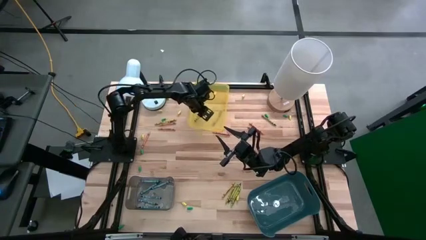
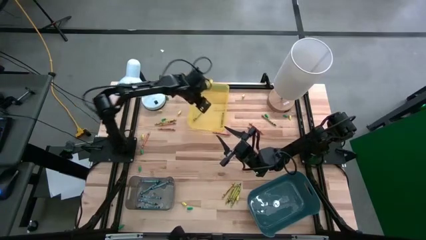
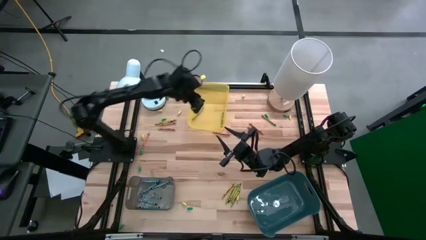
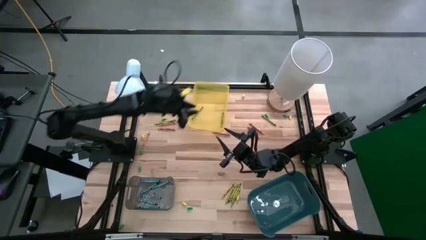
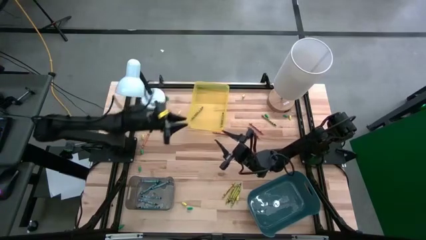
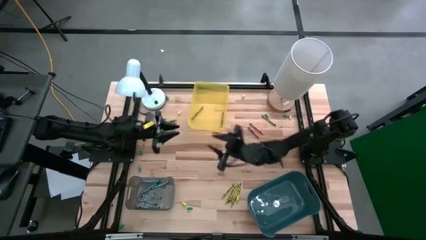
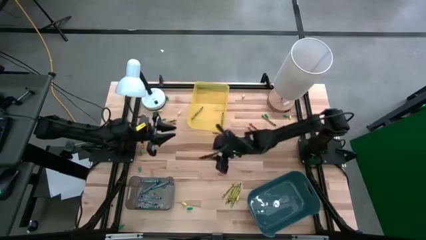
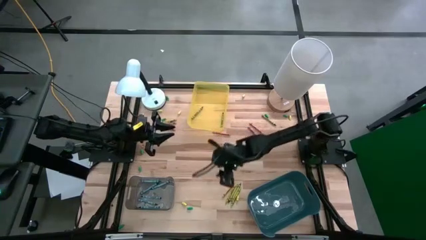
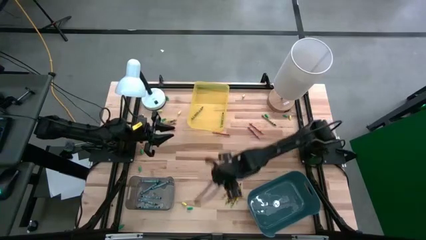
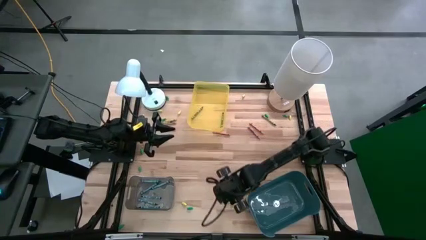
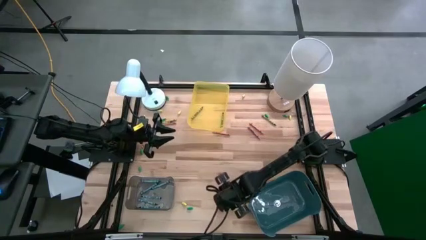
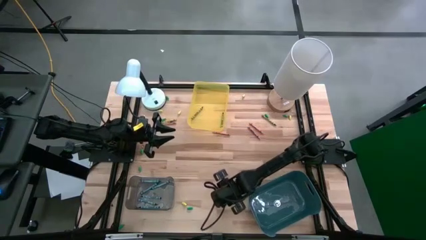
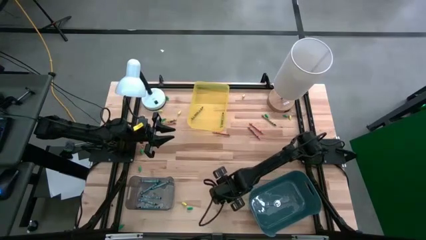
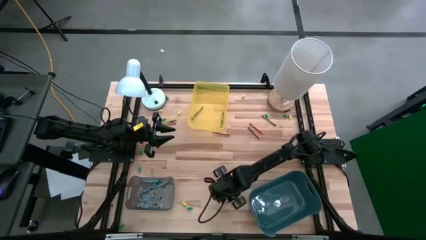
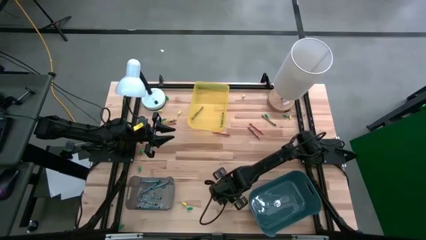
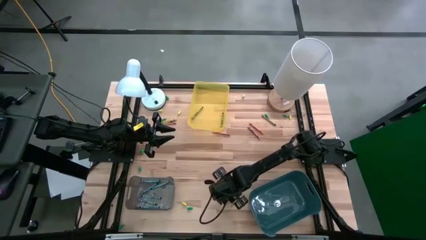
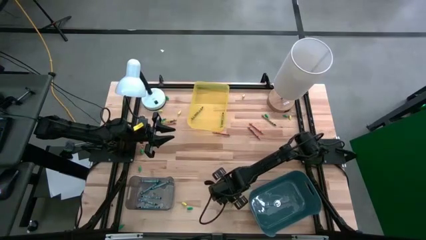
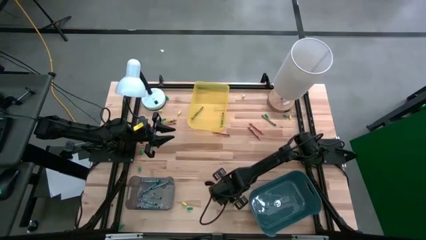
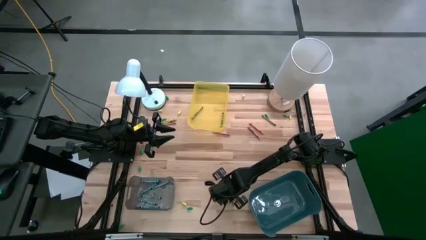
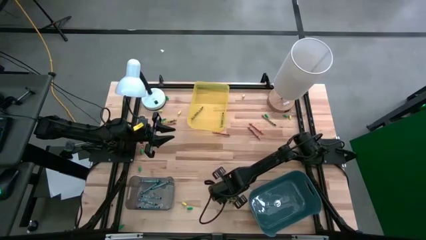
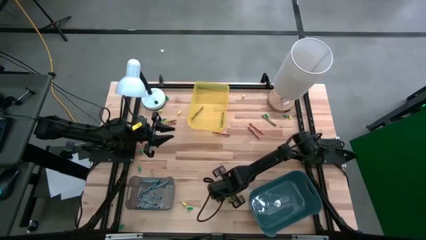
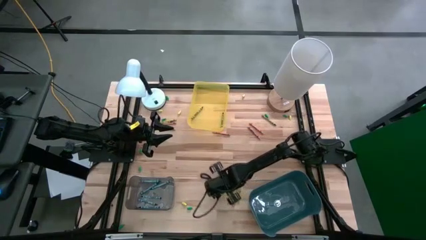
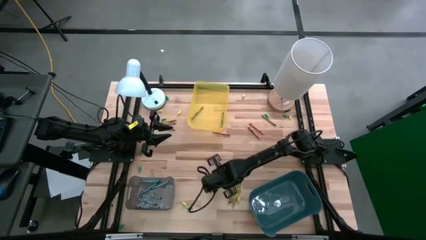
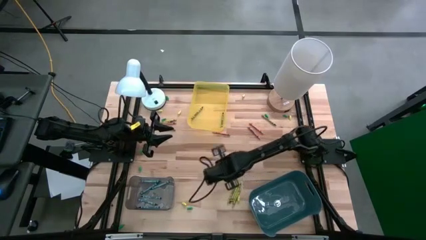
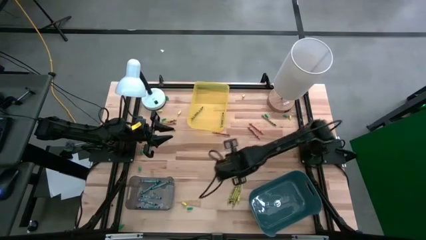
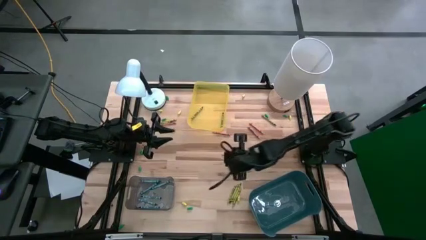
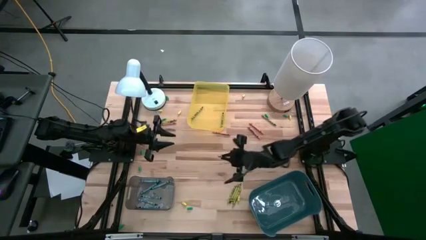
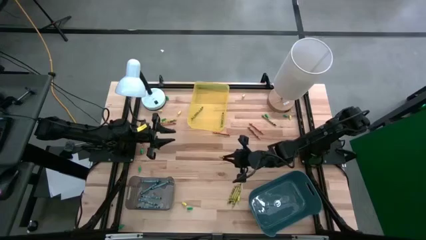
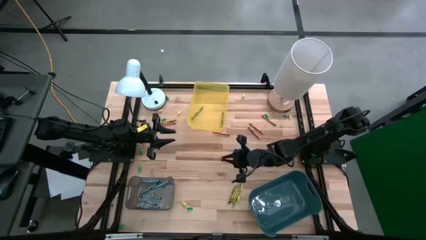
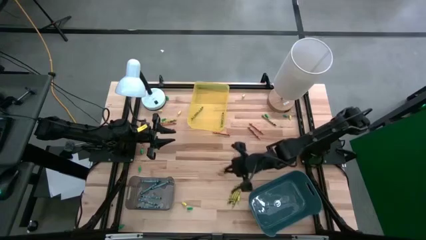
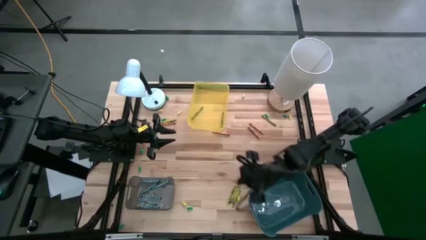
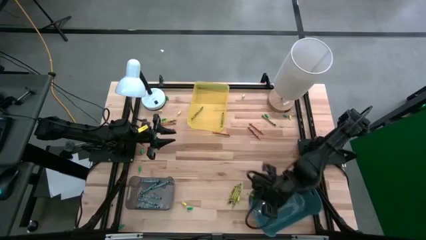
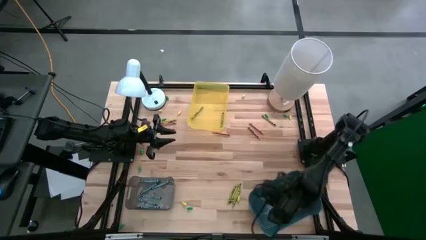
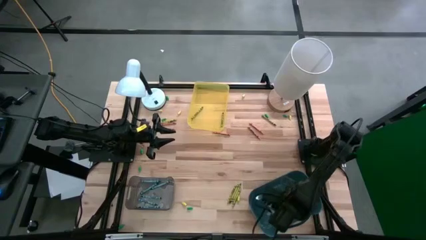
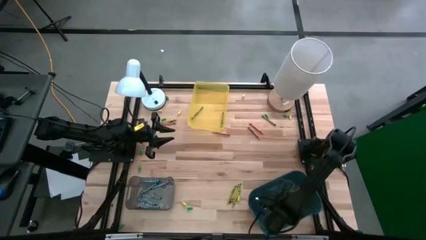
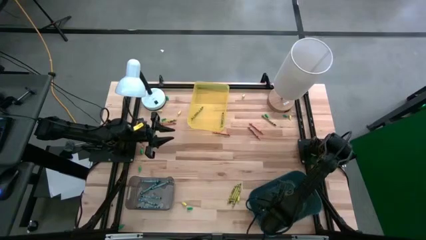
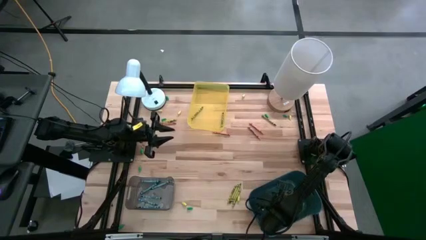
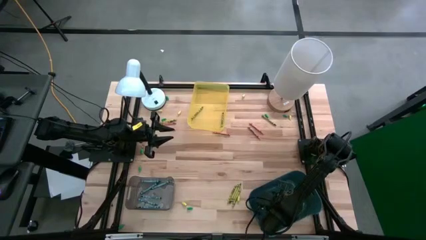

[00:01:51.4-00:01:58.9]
Task: Sort crayons
Put the yellow green crayon into the green bin

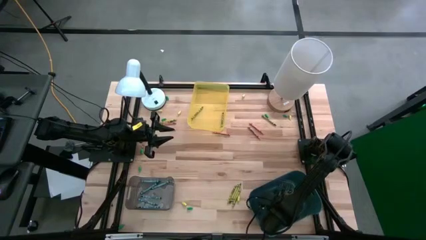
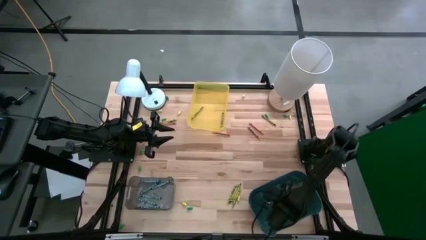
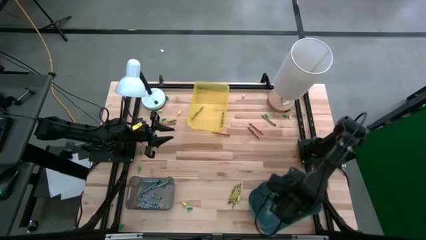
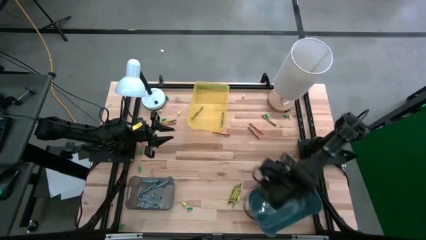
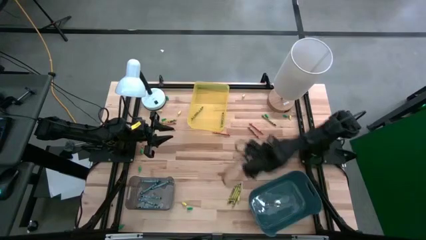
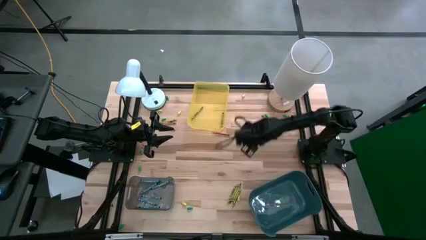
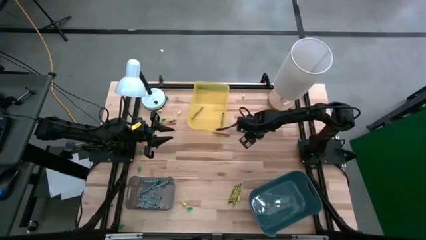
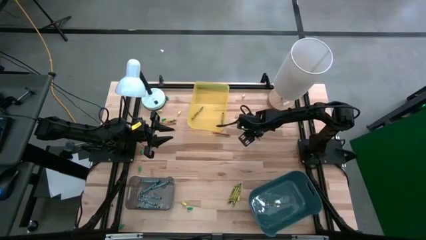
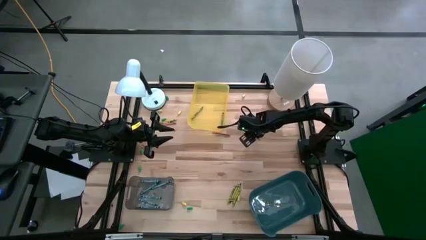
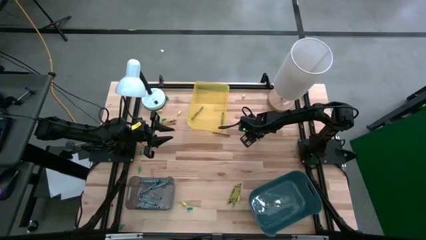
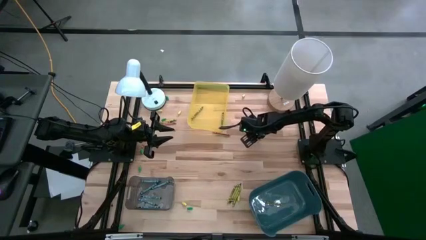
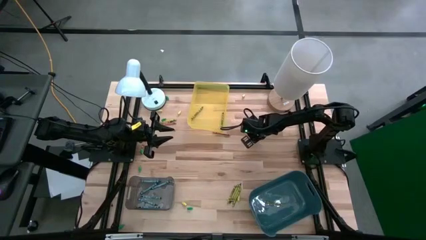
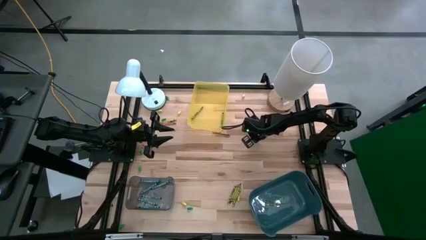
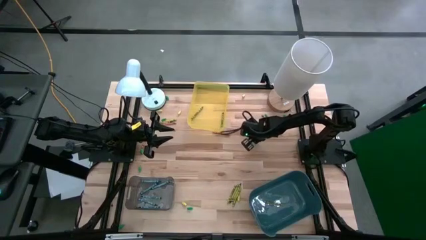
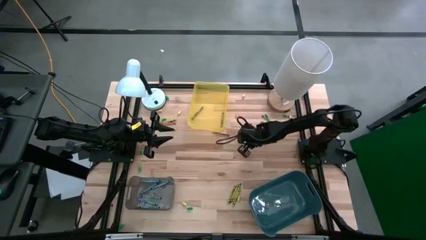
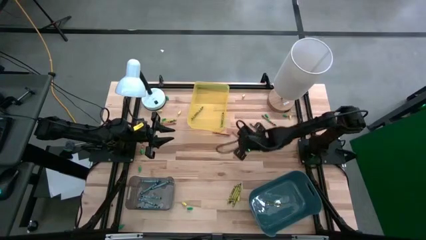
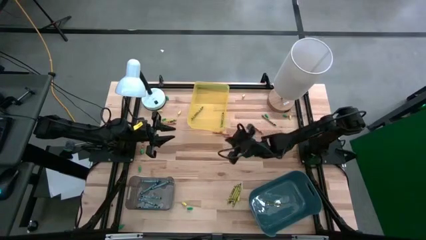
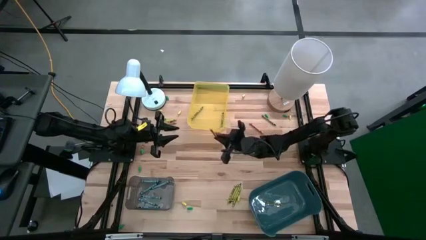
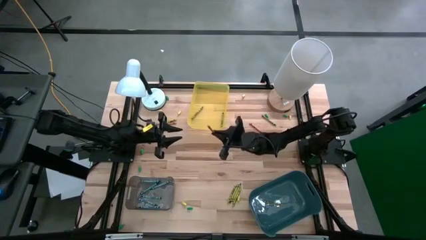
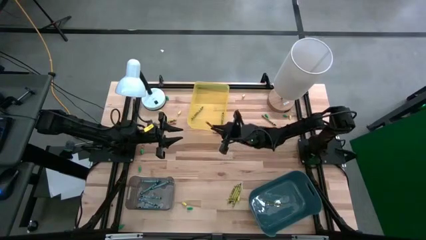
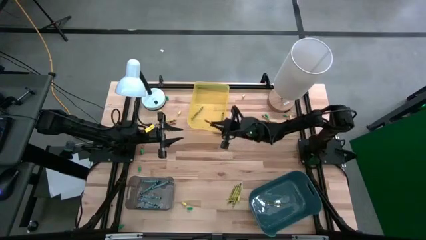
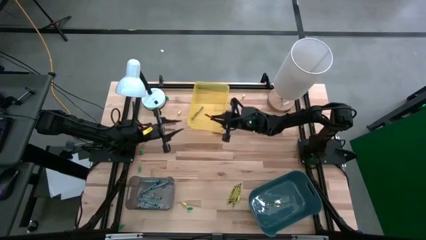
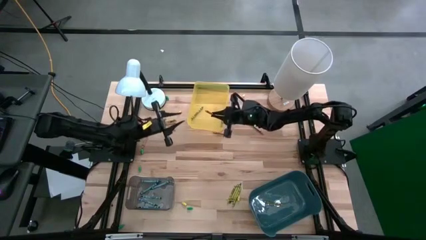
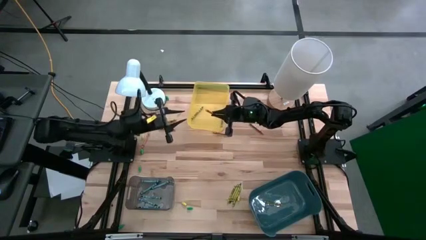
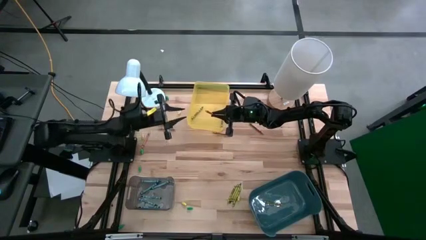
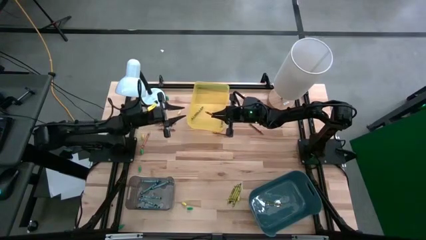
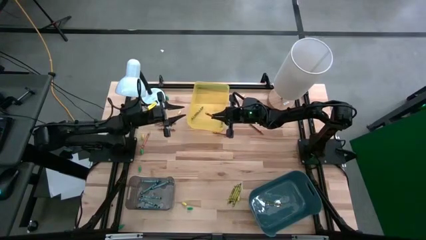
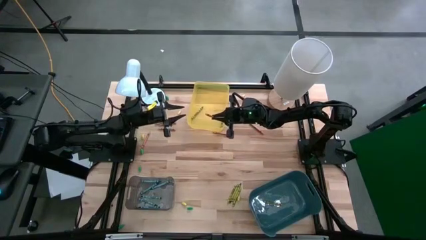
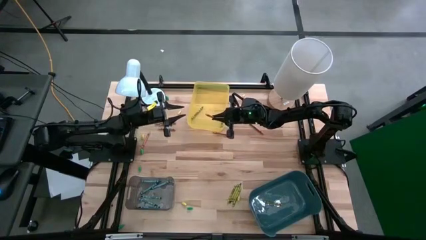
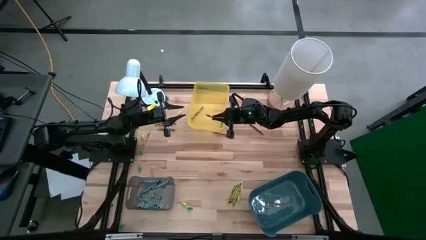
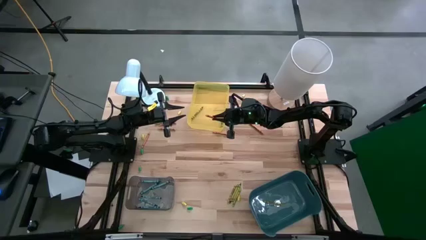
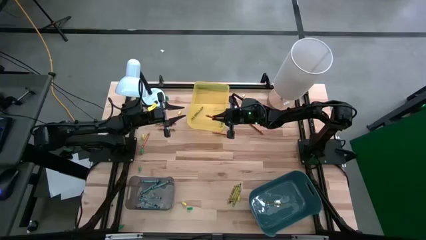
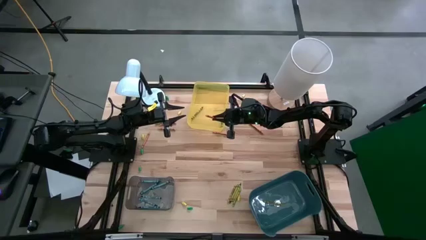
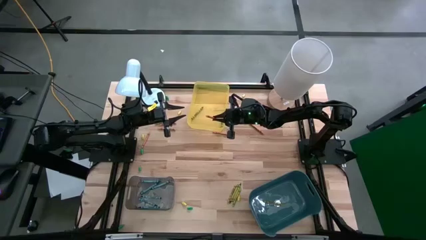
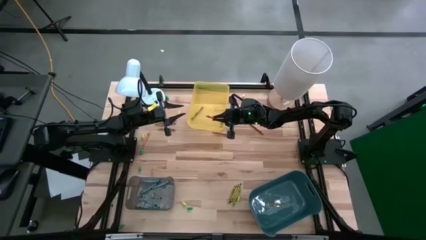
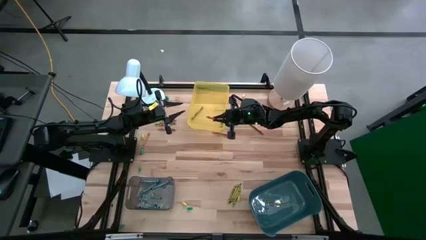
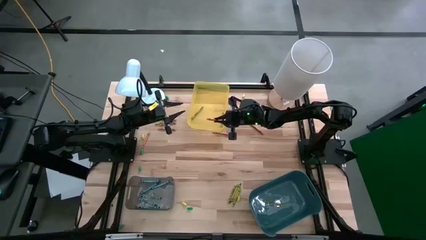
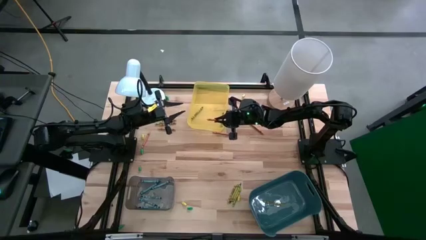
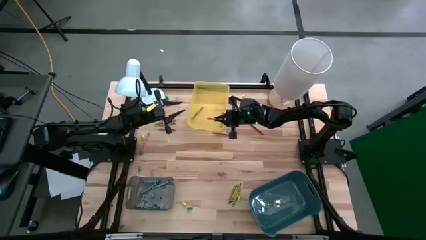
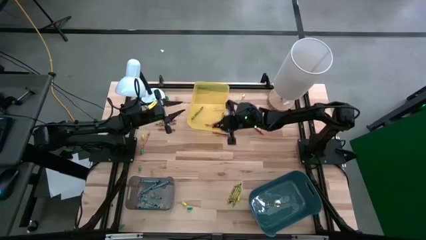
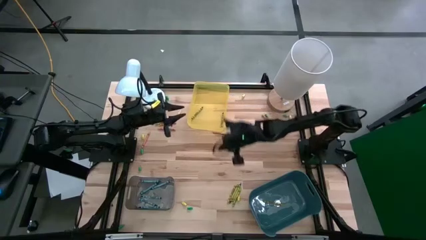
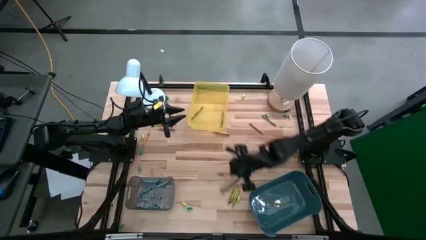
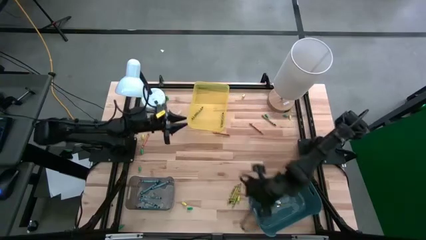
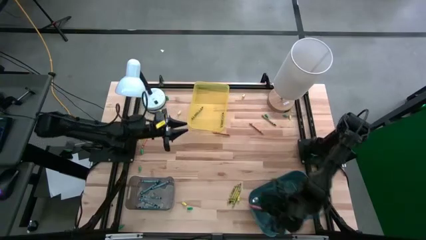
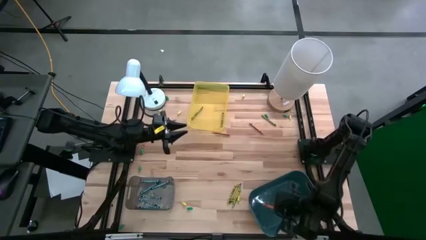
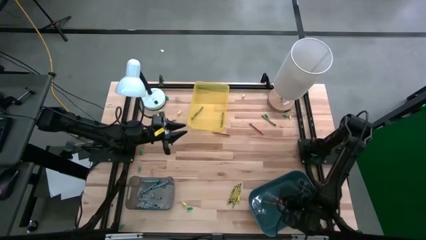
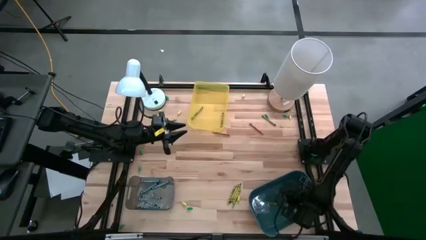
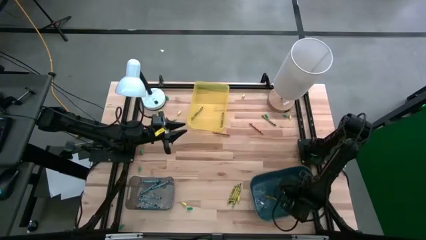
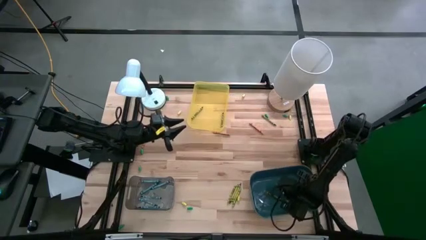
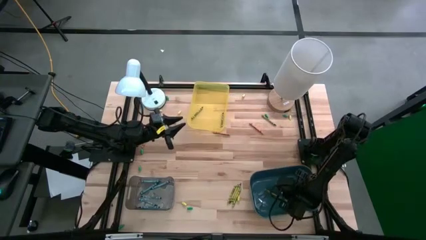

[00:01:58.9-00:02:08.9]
Put the orange crayon into the pine green bin
